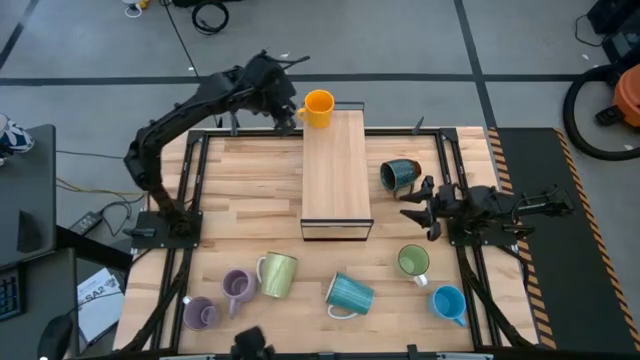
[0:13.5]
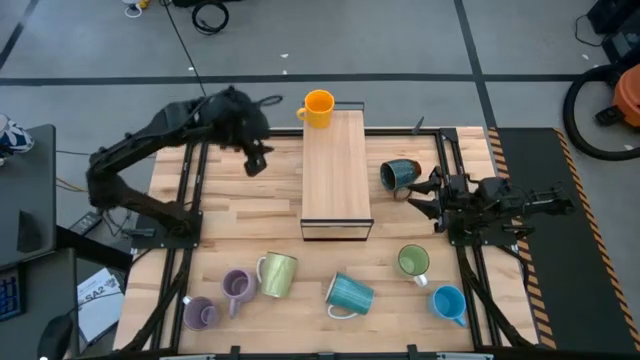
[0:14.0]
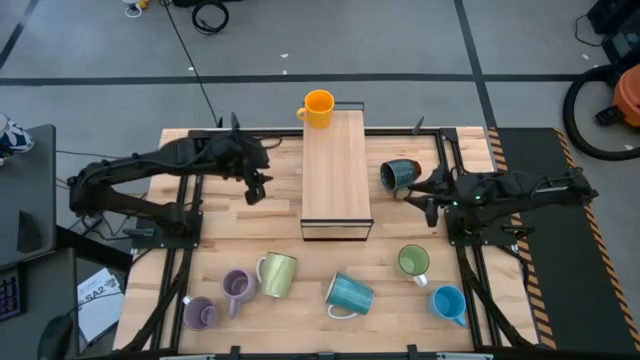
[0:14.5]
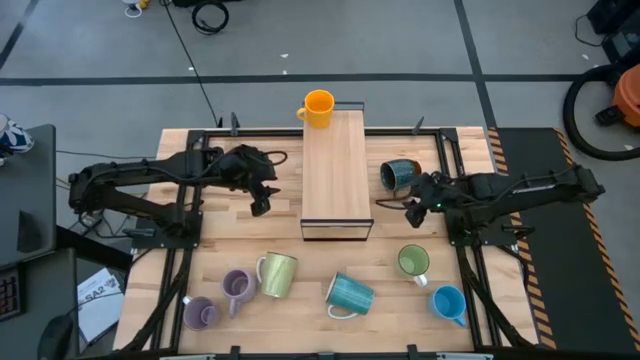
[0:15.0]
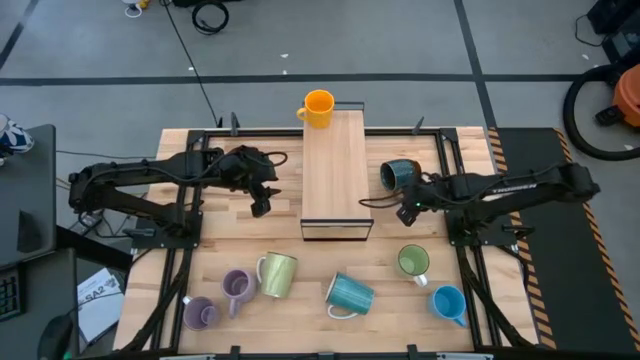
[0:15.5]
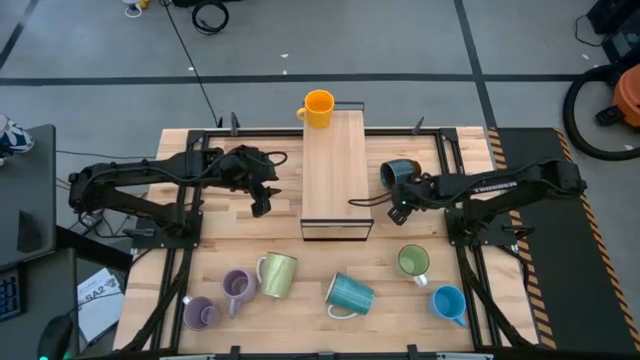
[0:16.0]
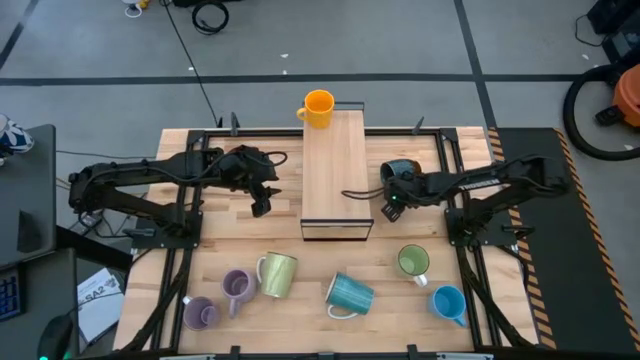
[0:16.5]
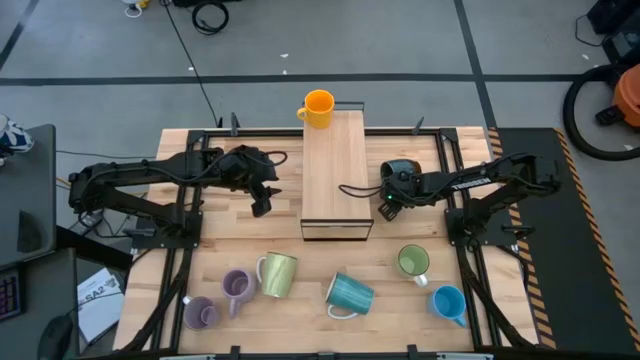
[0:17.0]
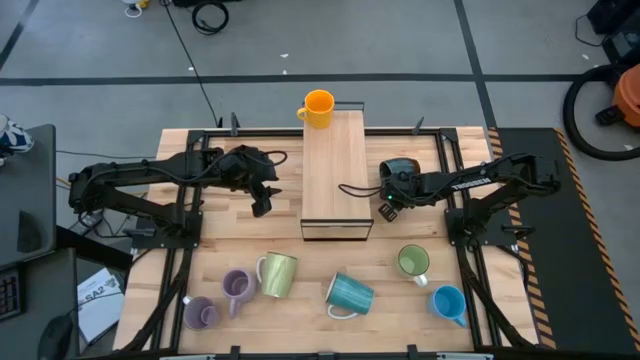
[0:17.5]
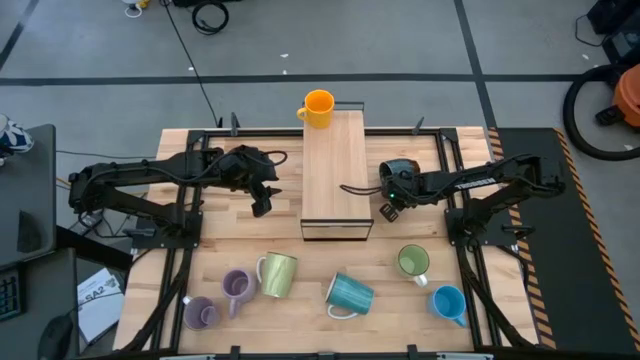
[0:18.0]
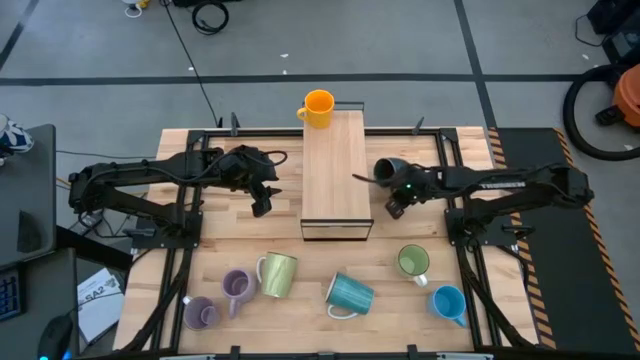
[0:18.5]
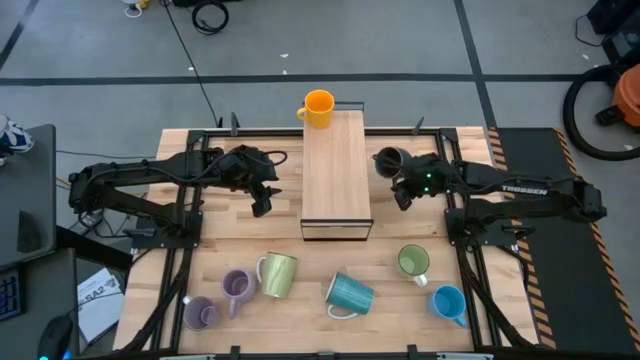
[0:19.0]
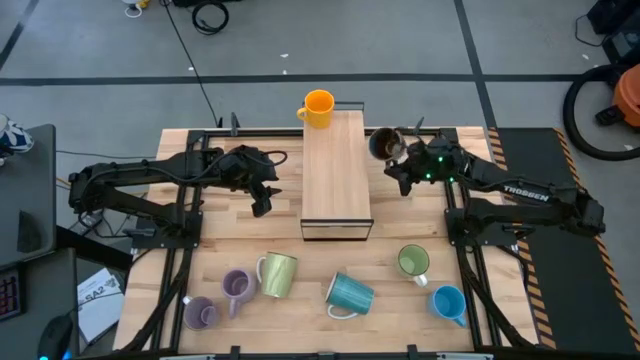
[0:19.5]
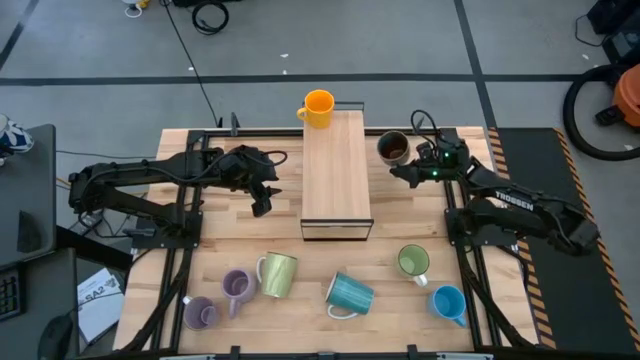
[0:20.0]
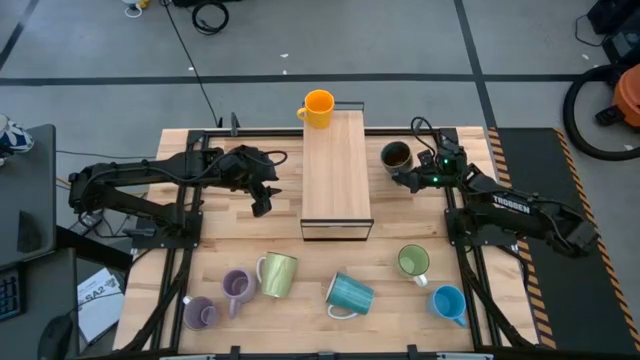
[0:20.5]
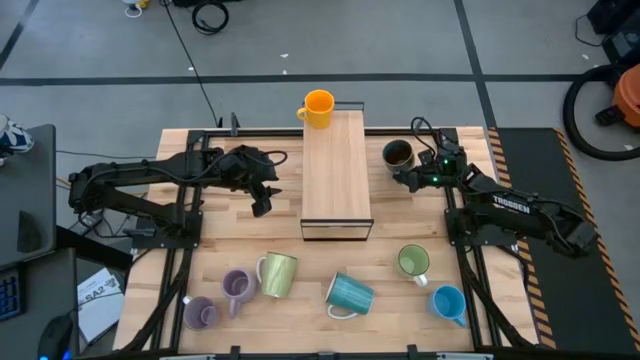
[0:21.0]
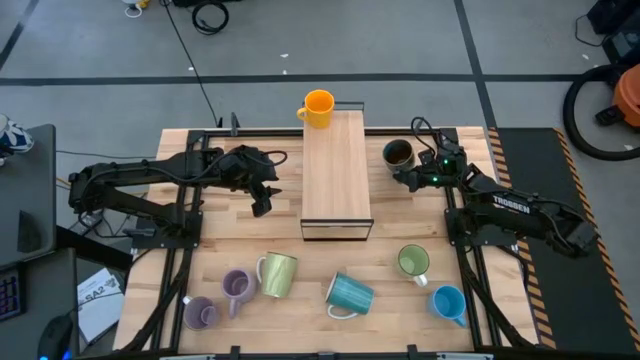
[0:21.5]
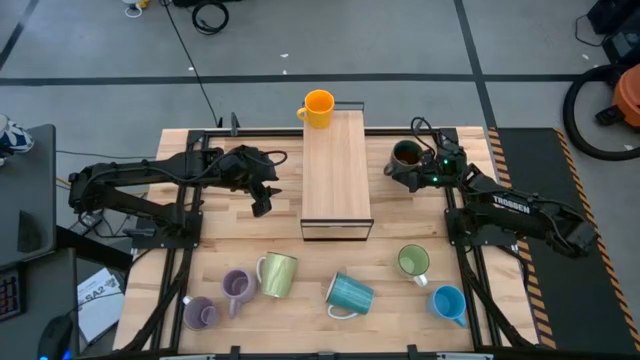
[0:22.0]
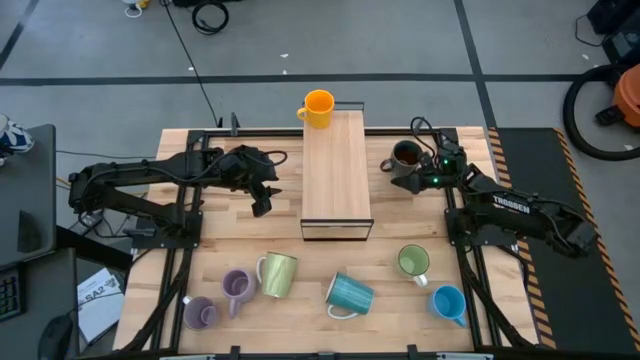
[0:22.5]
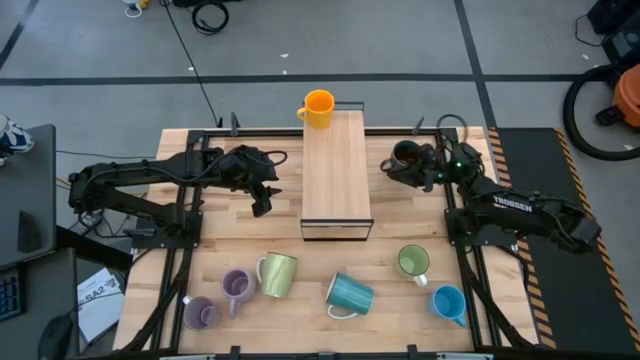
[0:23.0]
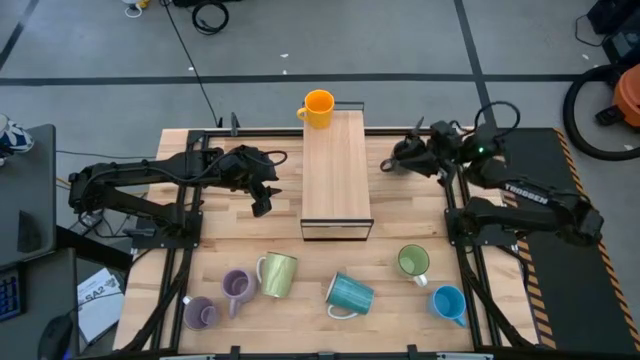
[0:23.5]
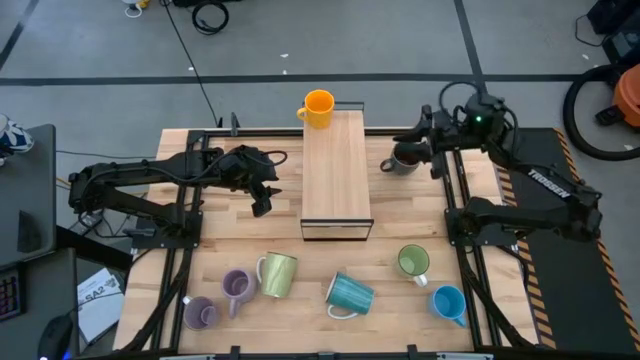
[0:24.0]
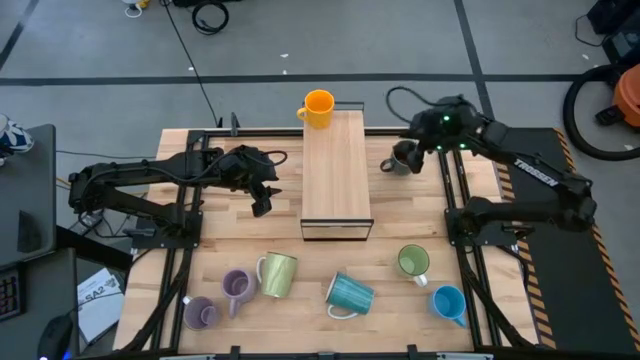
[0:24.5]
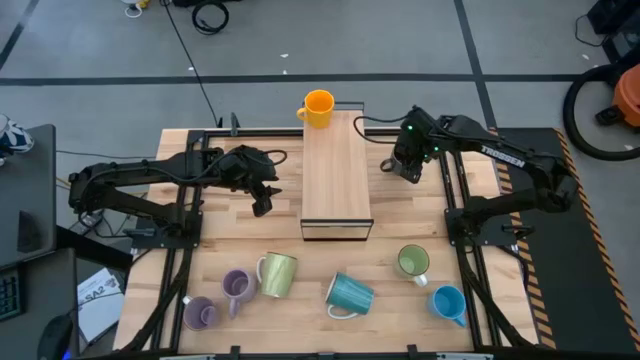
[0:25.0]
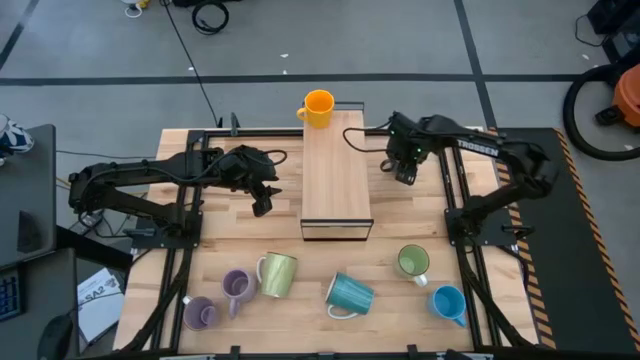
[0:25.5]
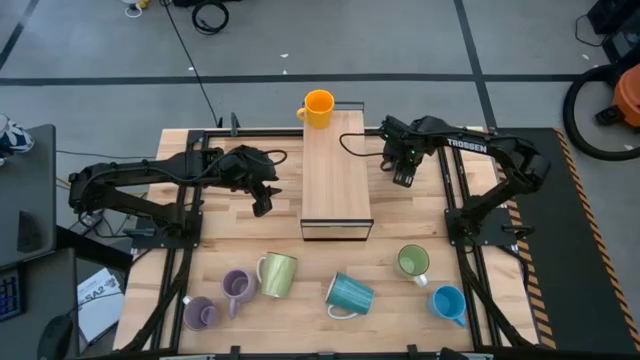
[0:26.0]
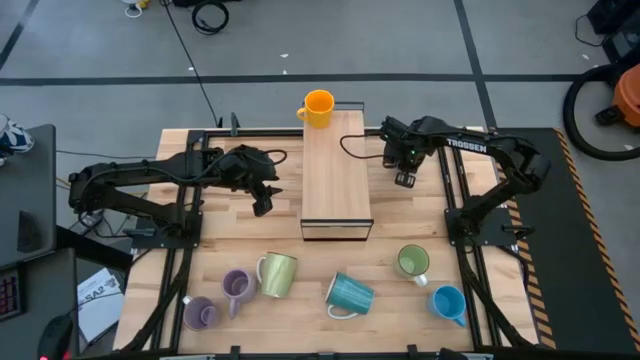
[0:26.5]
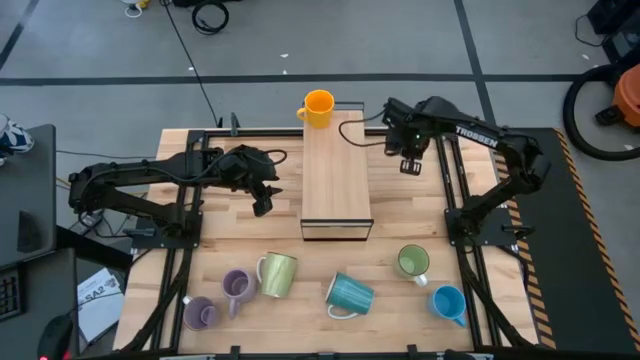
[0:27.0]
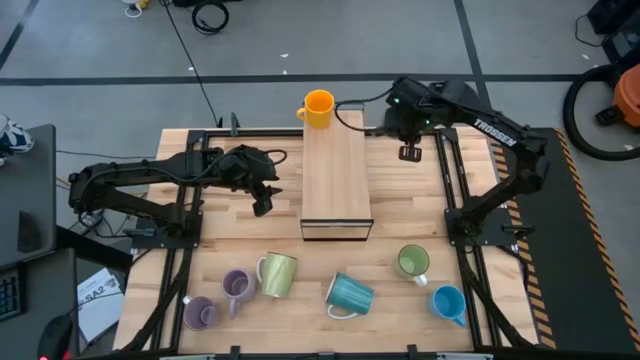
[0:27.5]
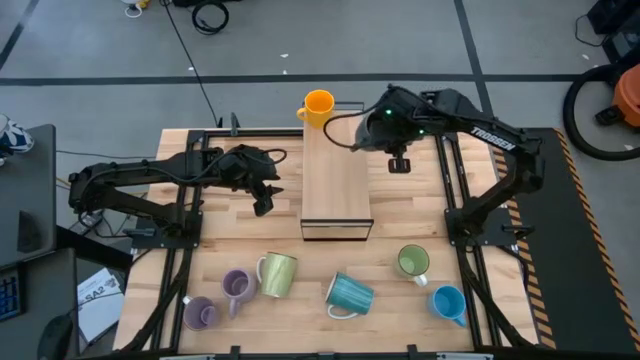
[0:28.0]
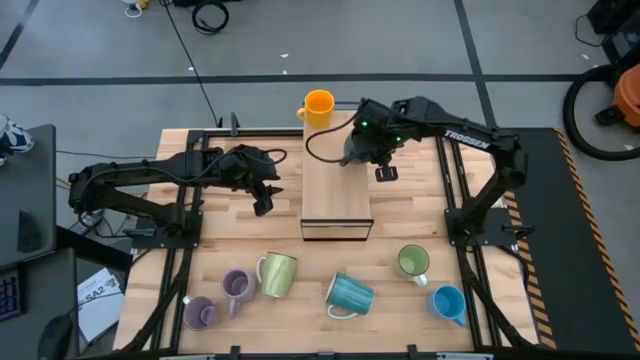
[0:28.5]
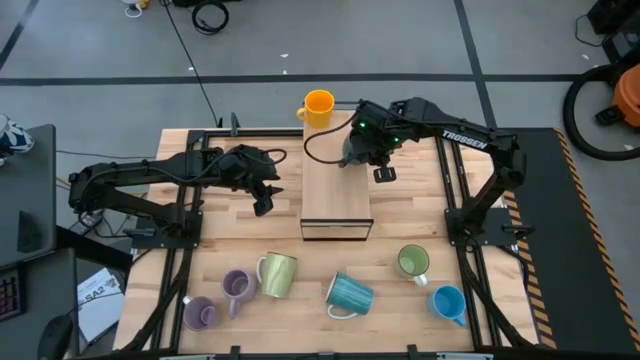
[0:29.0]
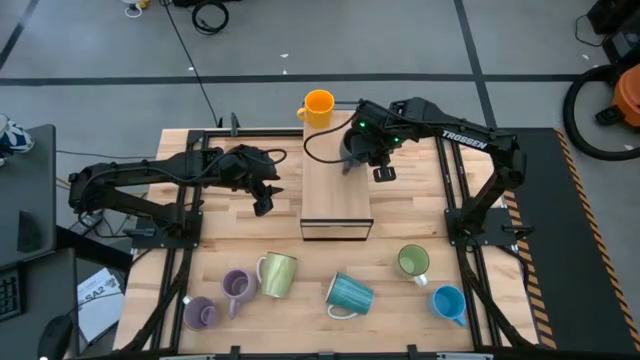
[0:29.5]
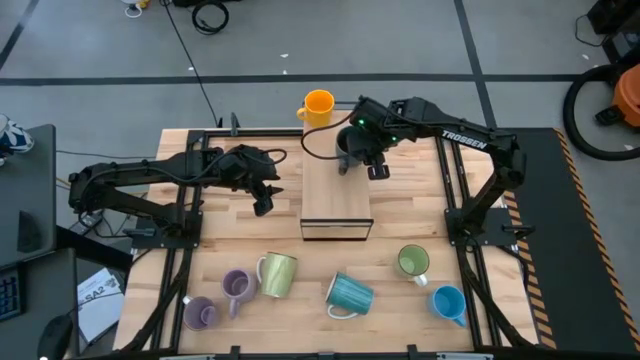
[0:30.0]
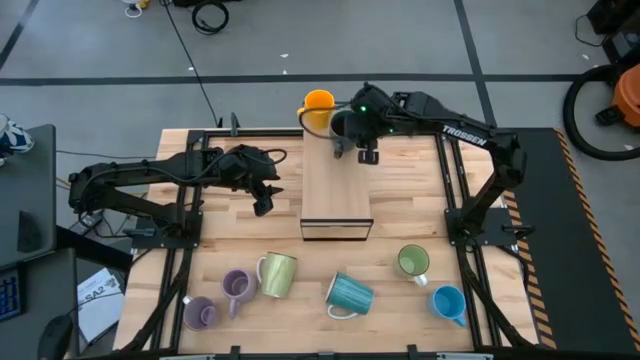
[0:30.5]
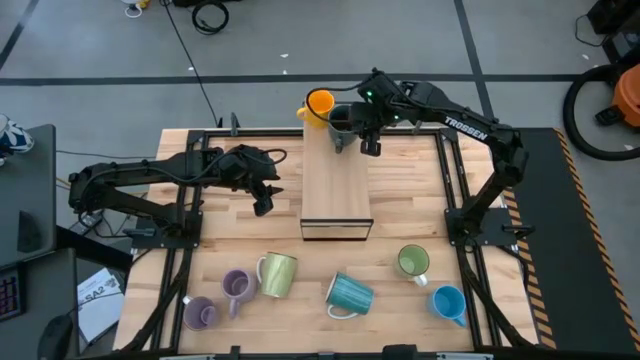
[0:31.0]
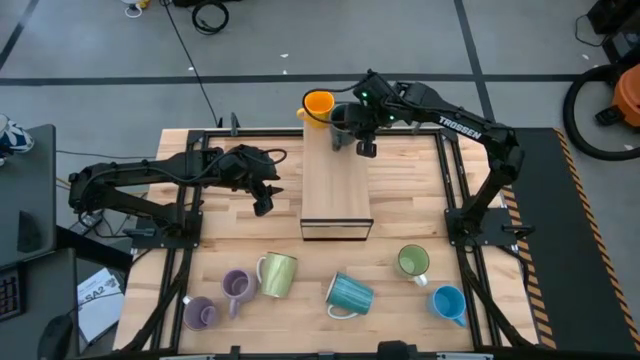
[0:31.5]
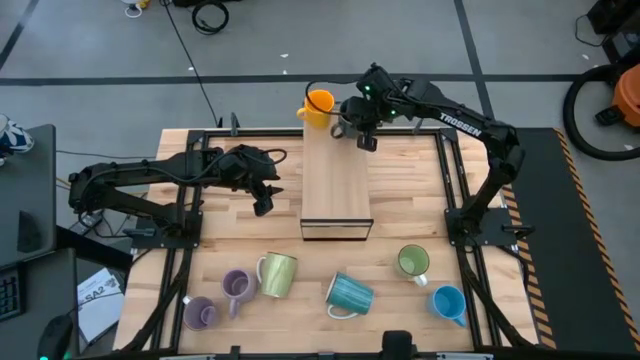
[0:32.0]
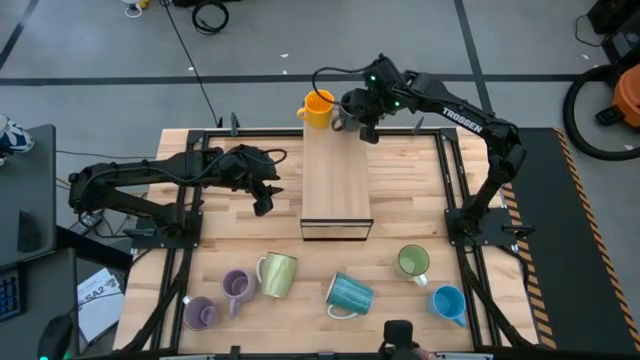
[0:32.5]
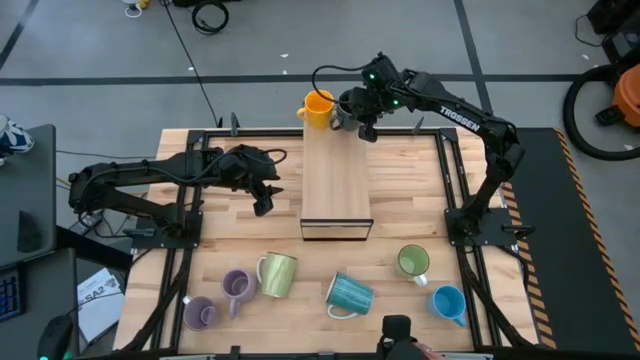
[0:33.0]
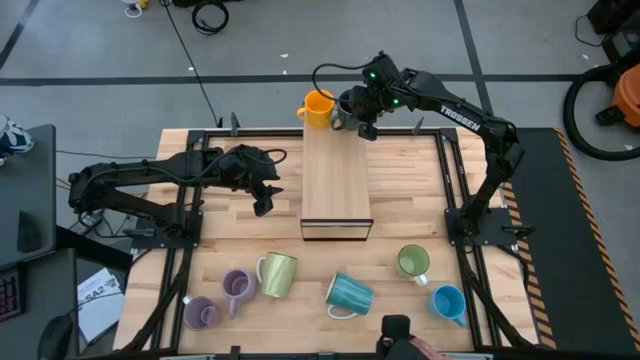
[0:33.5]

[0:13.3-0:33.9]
Task: Place coffee mugs
Put the dark green mug on the shelf
